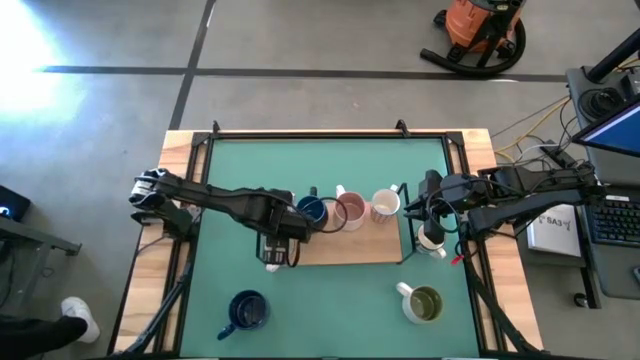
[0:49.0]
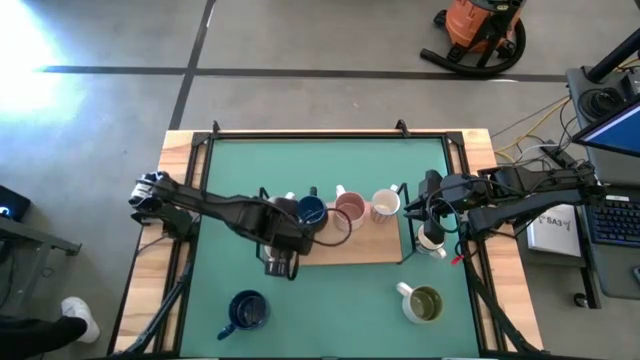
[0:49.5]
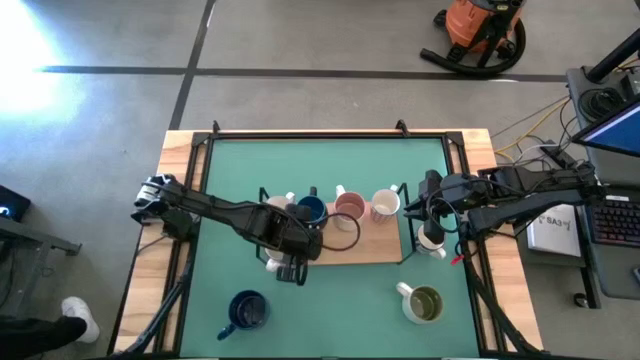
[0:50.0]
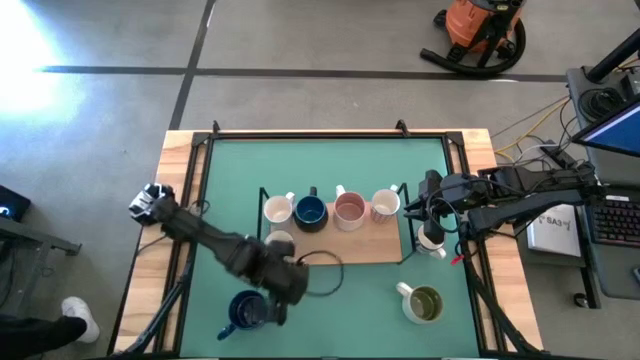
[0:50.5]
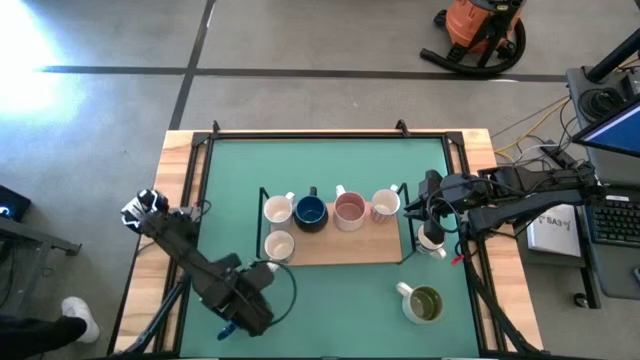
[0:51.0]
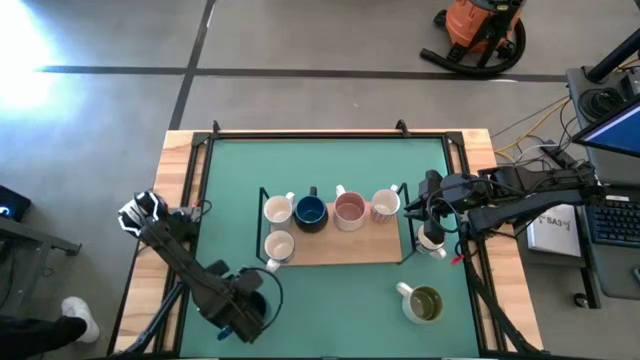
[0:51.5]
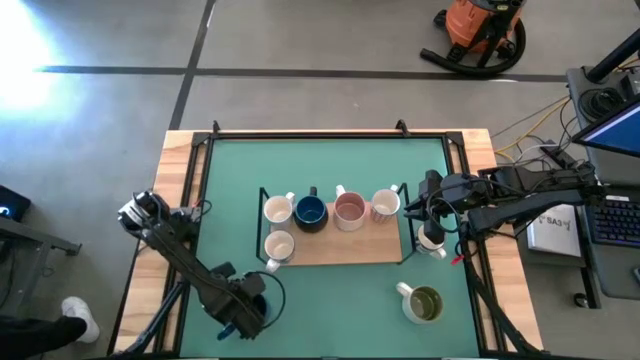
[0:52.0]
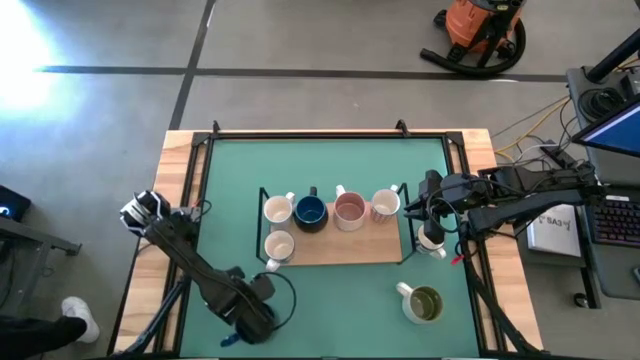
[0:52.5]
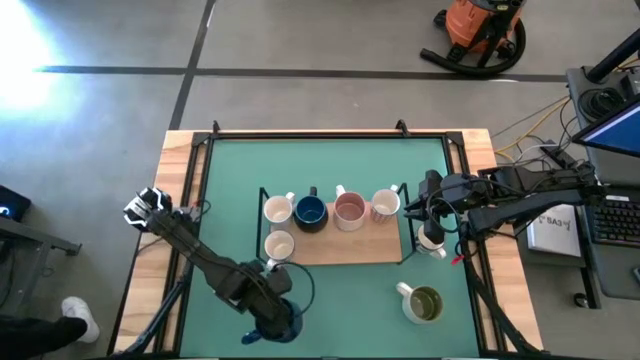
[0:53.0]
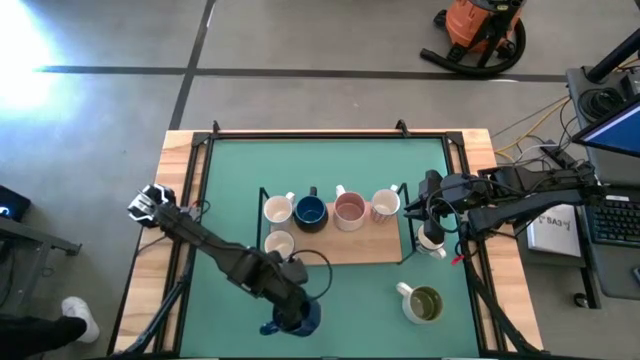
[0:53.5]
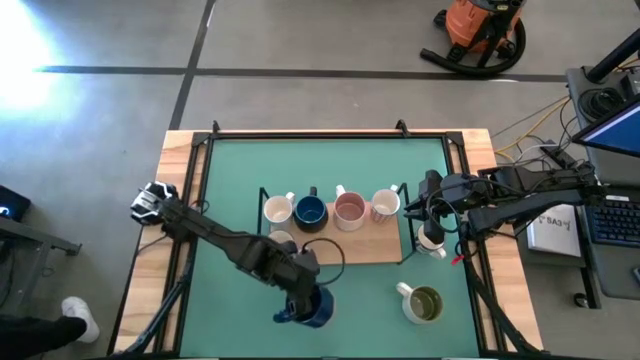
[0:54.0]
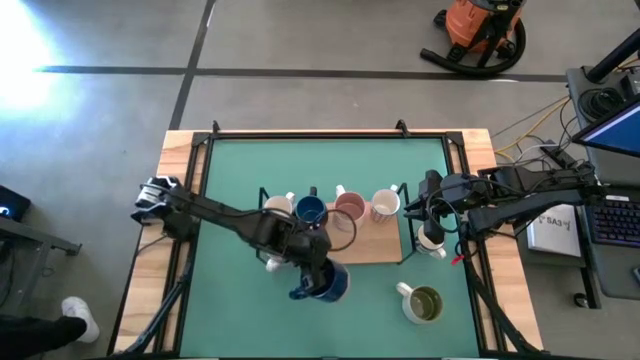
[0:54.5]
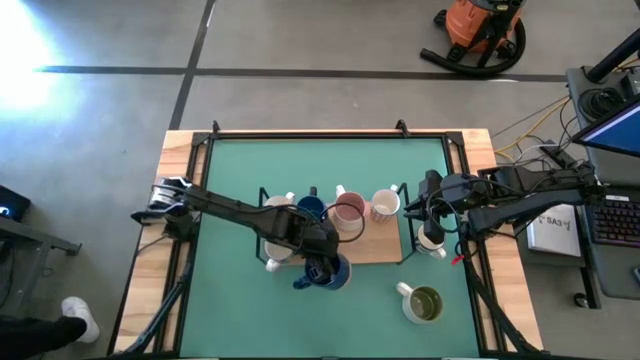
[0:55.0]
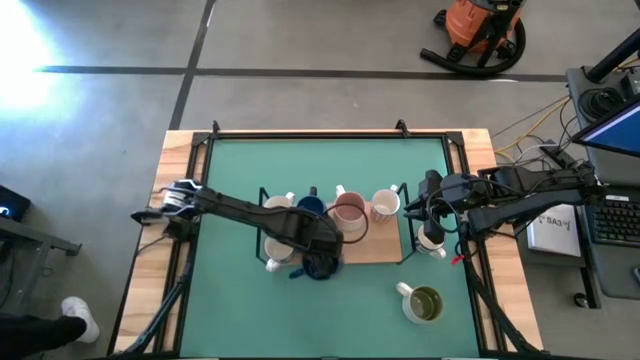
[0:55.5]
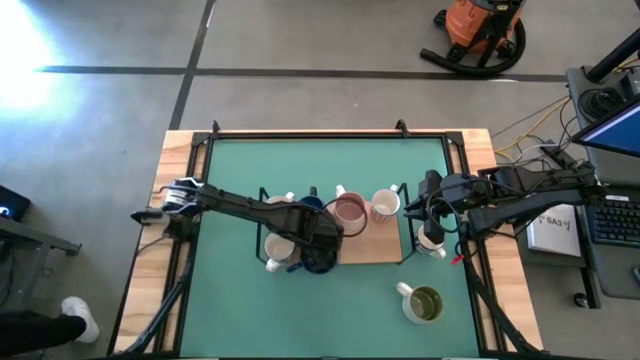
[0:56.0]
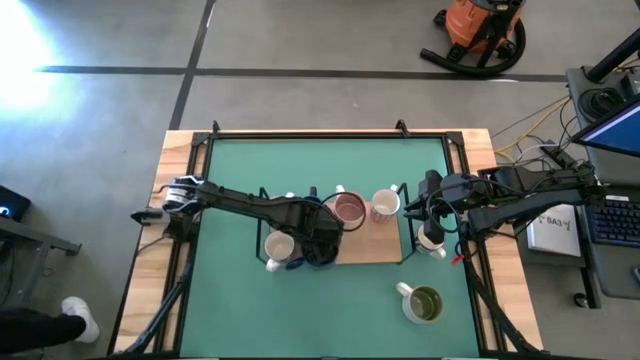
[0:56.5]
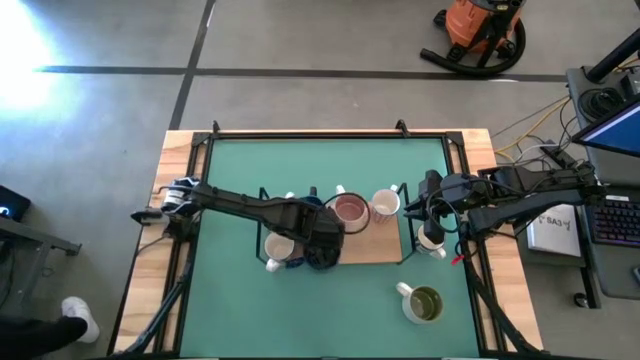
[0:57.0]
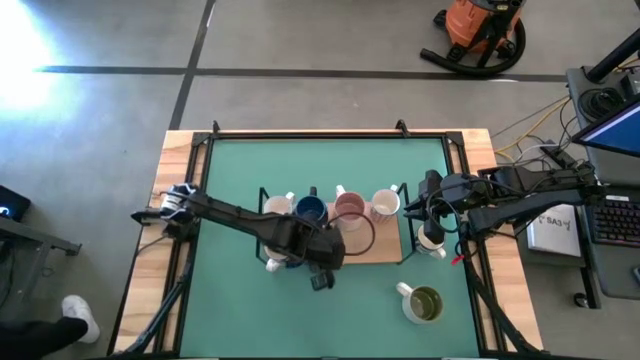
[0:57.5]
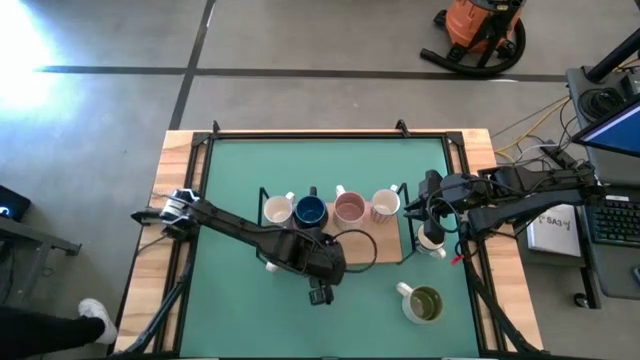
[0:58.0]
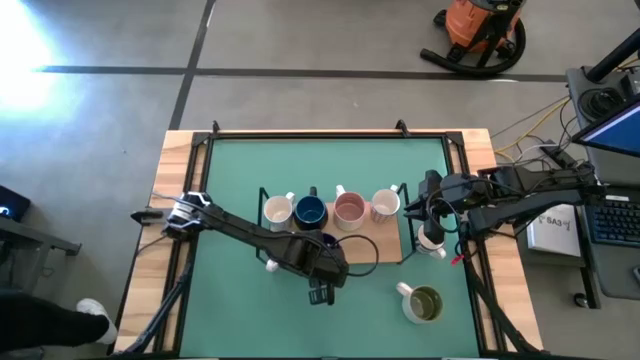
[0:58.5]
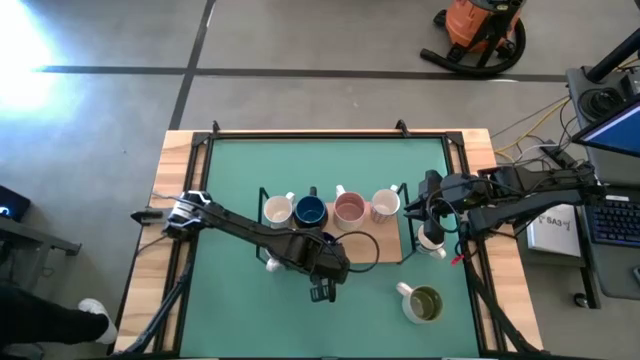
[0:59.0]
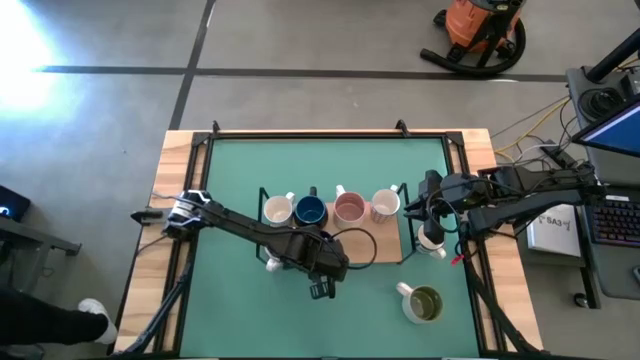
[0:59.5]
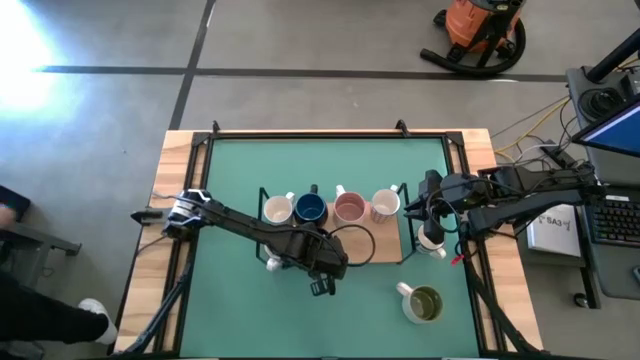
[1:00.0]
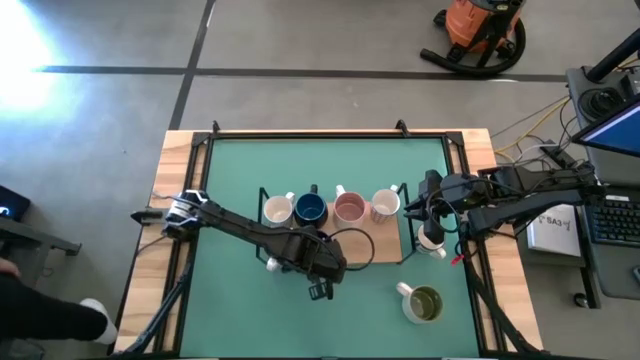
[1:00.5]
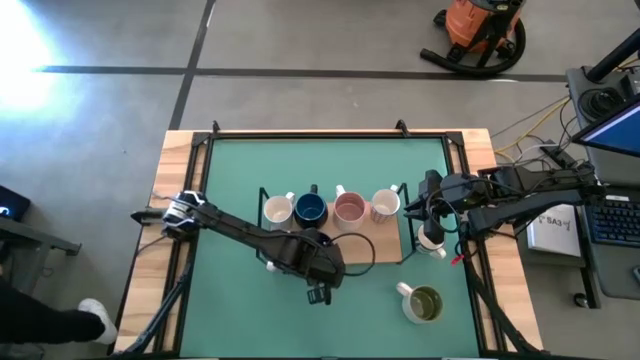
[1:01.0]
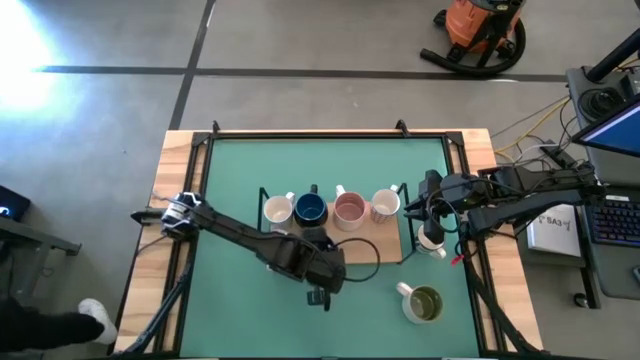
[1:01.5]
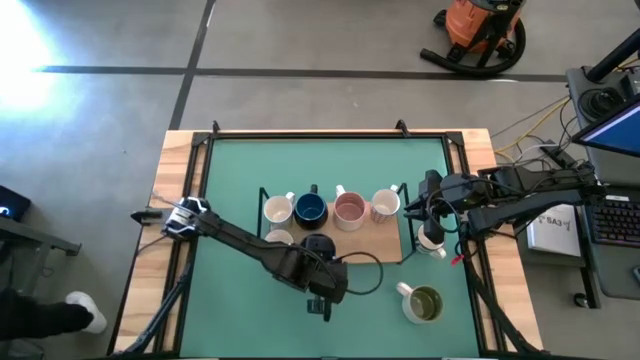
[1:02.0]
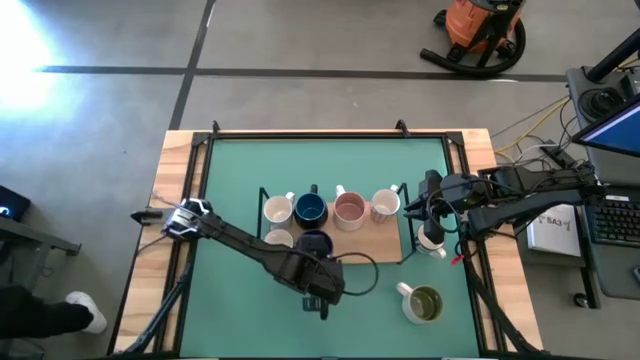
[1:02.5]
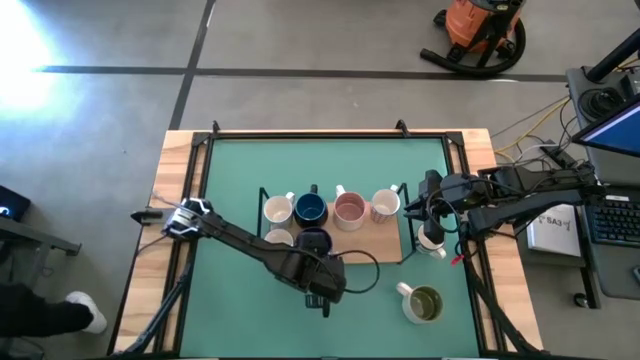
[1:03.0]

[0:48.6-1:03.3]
Task: Place coffee mugs
Put the blue mug on the shelf

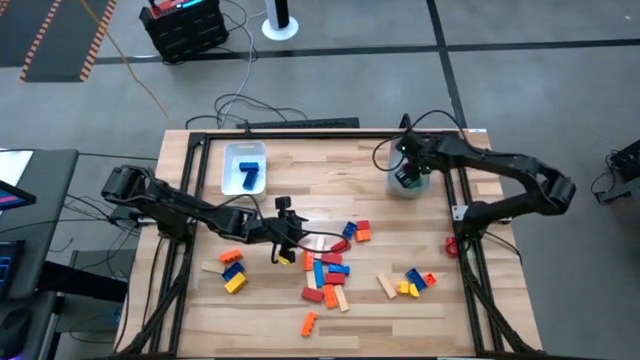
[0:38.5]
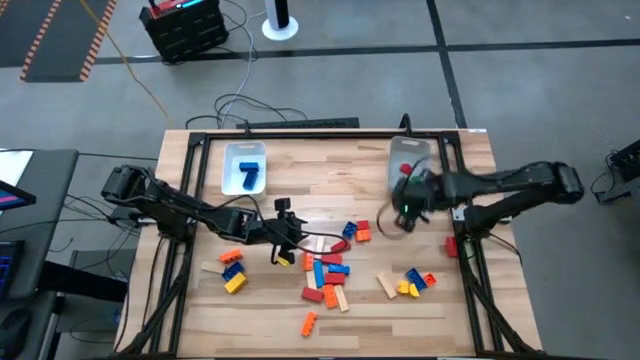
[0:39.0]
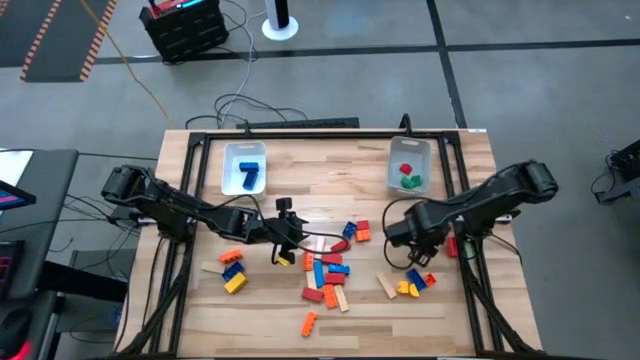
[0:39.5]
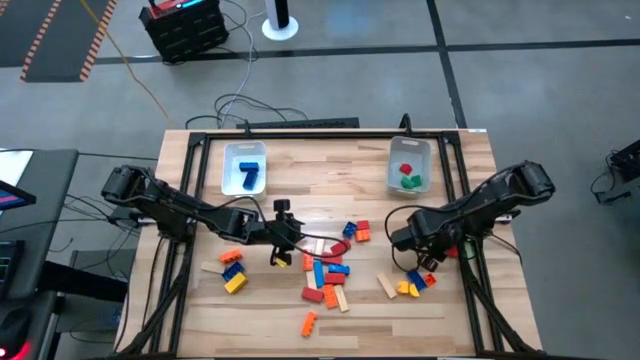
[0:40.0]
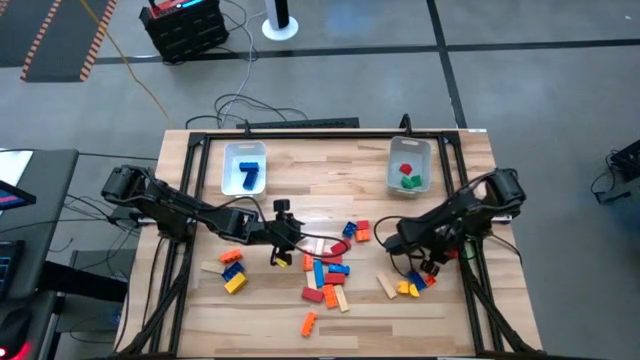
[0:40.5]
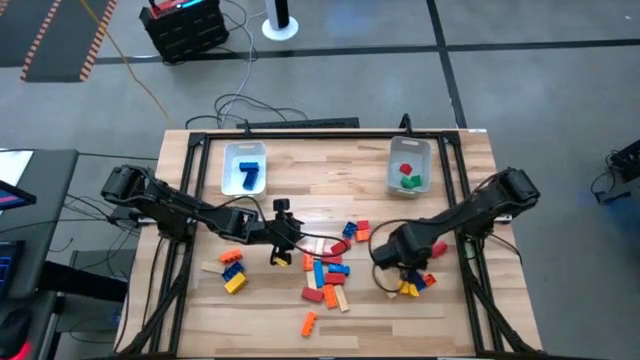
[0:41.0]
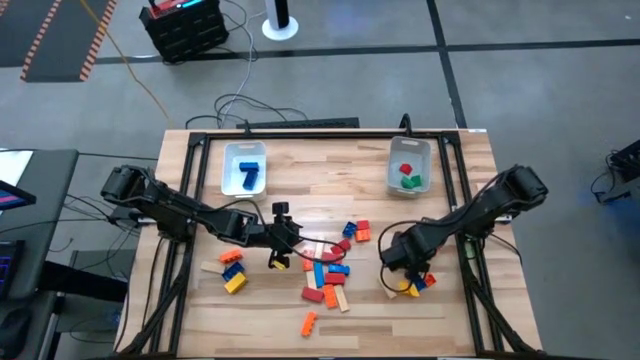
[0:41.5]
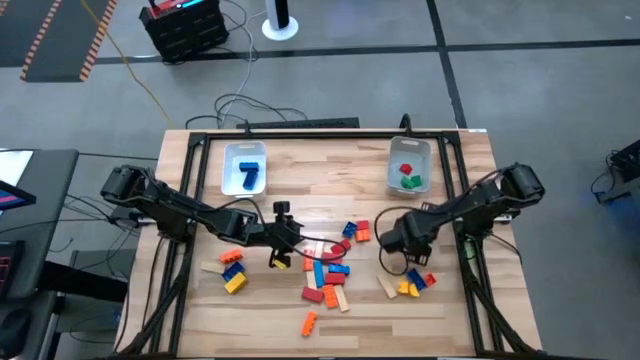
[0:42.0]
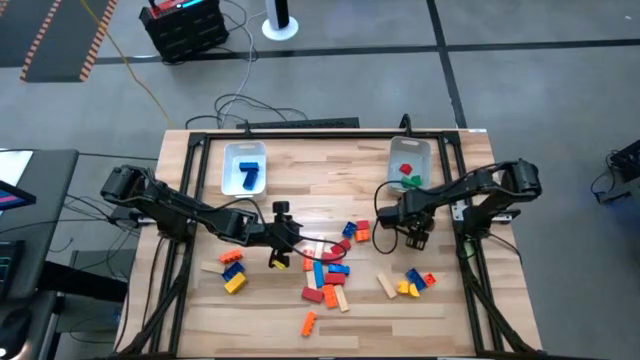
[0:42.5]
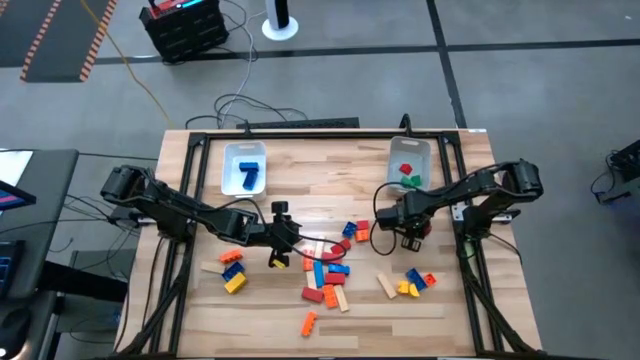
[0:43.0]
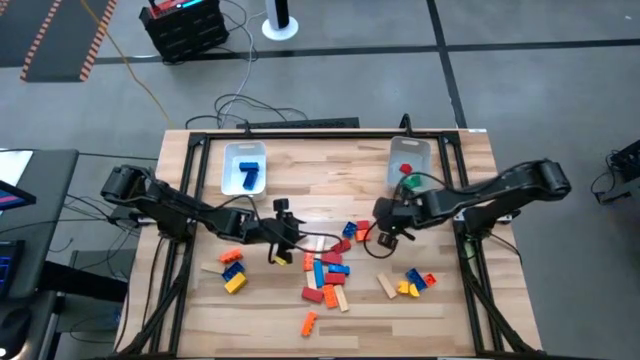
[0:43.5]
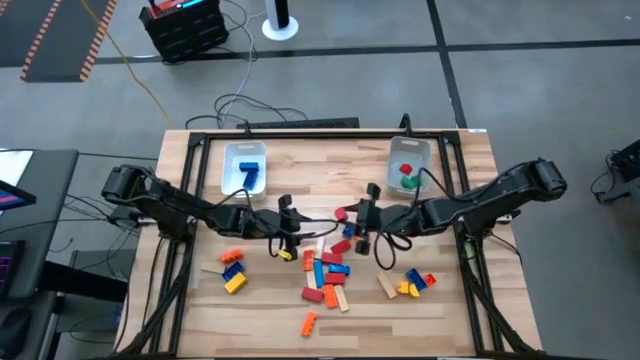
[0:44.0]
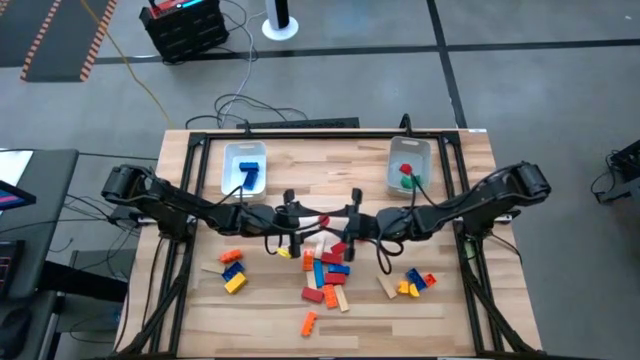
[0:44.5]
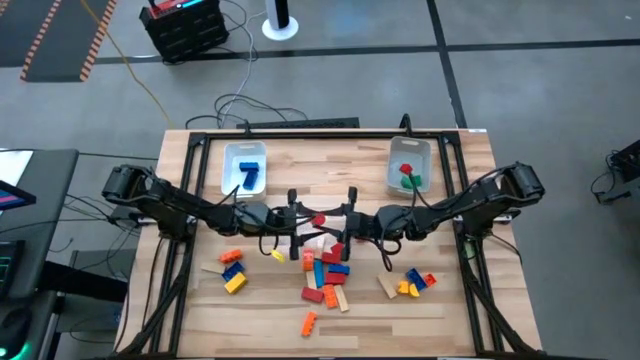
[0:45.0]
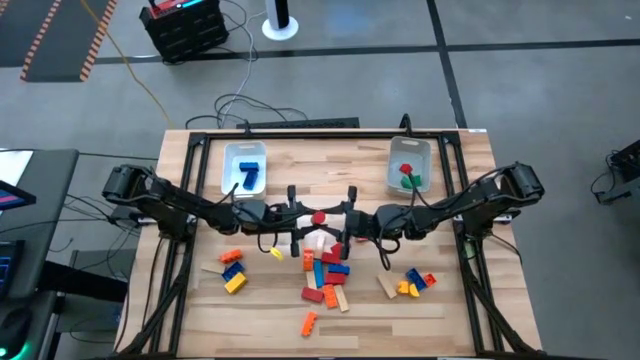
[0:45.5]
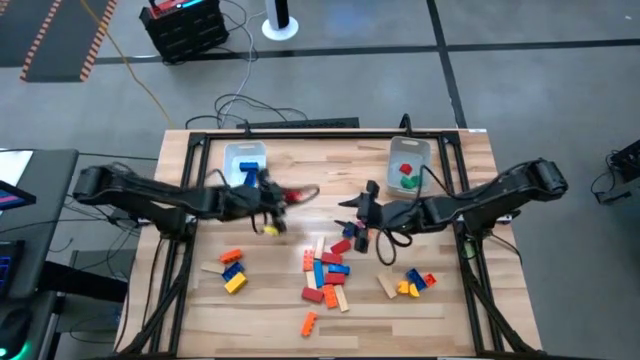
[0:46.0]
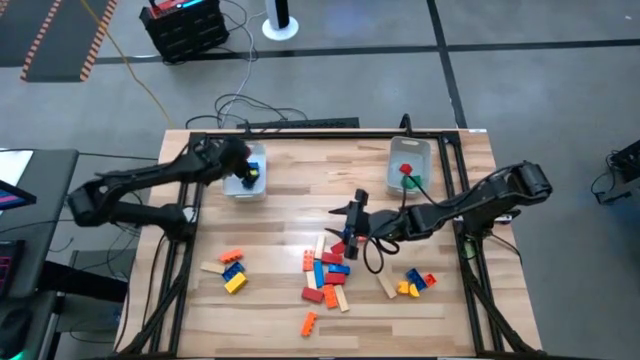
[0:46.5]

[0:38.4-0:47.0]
Task: Sort blocks by size
Put the large red block into the white bin
